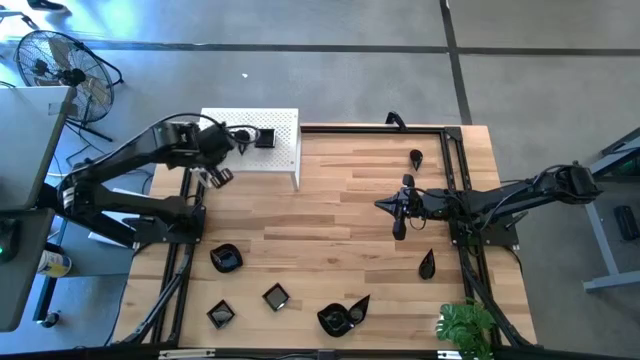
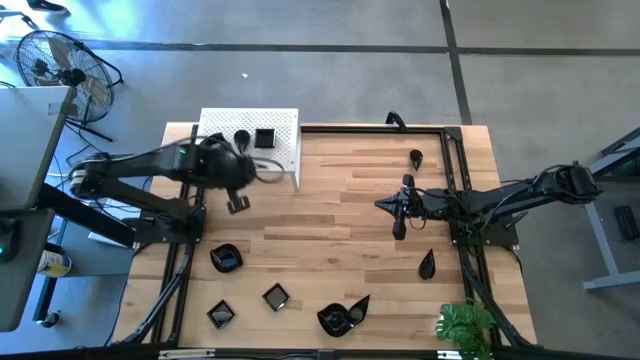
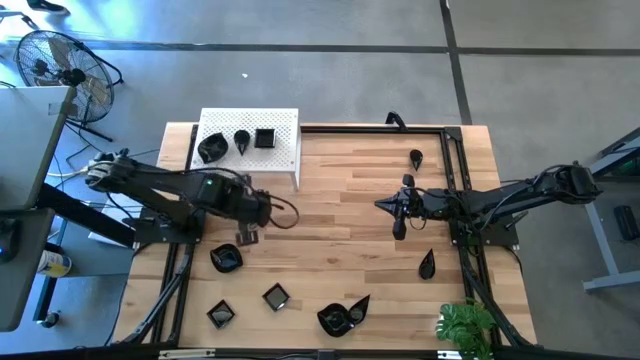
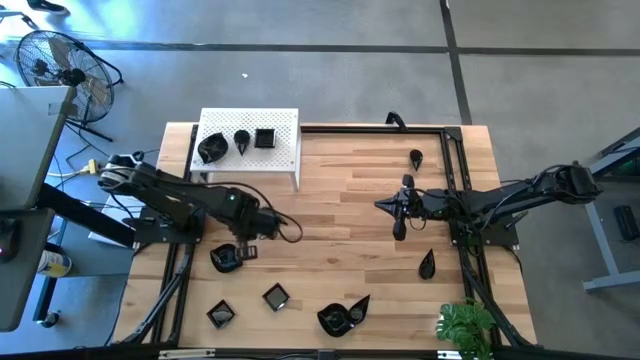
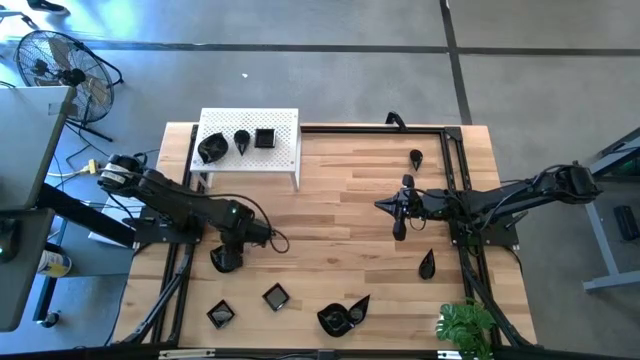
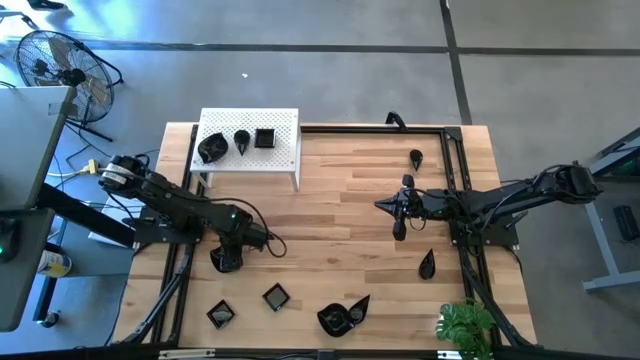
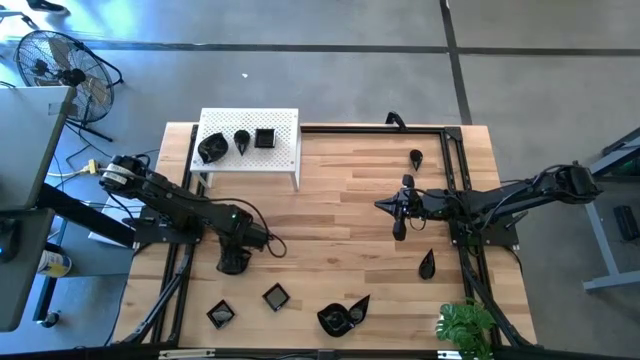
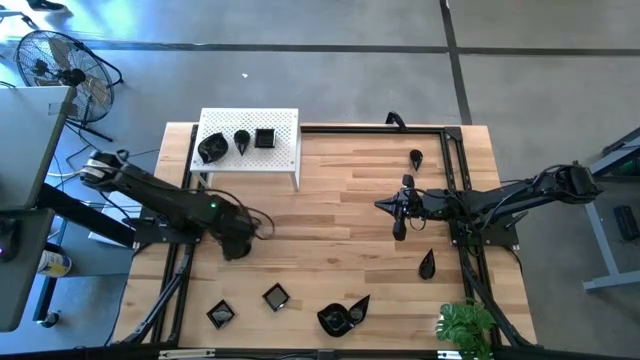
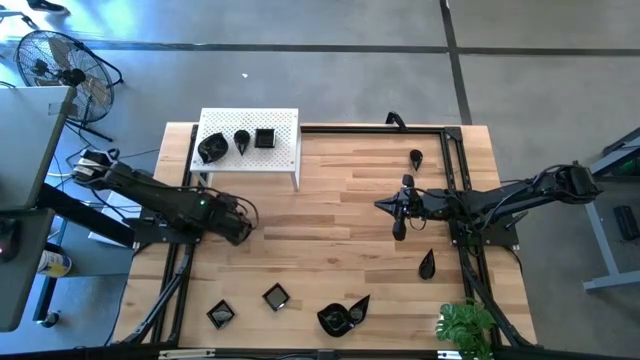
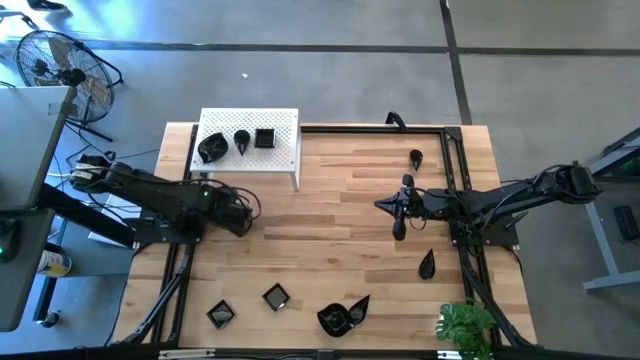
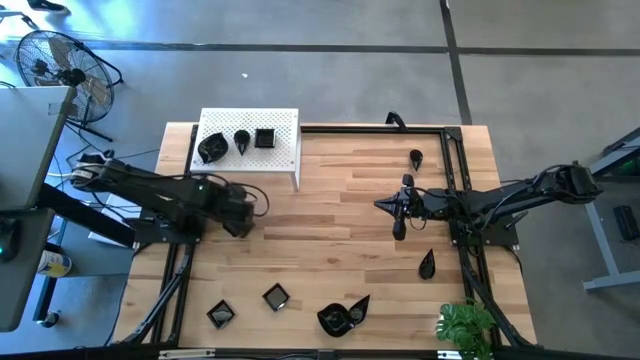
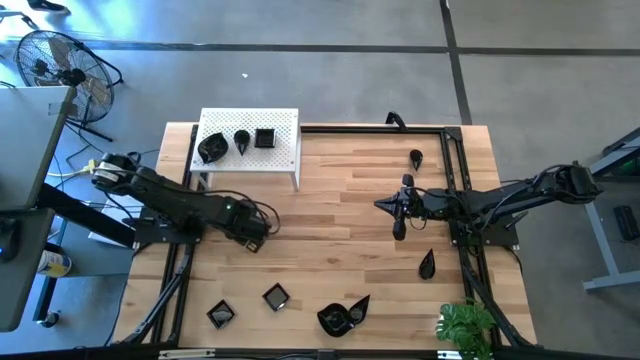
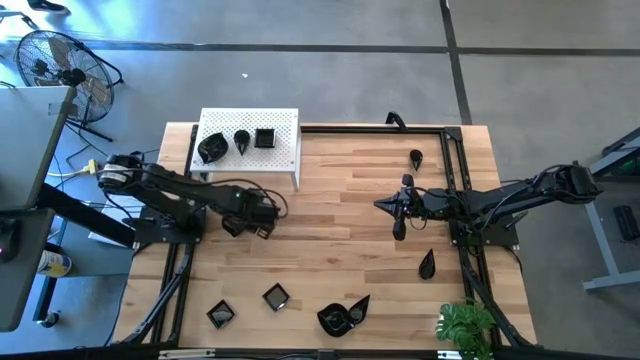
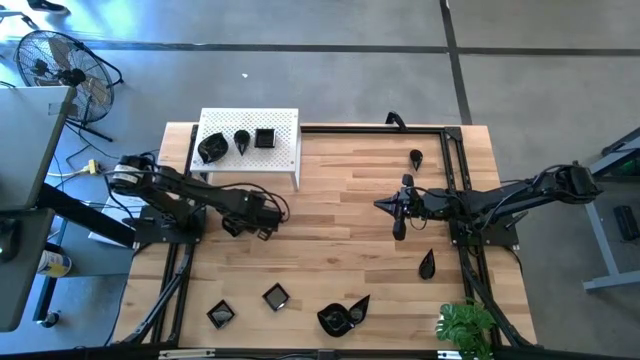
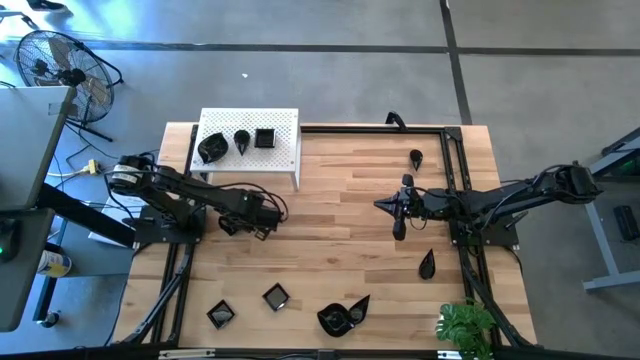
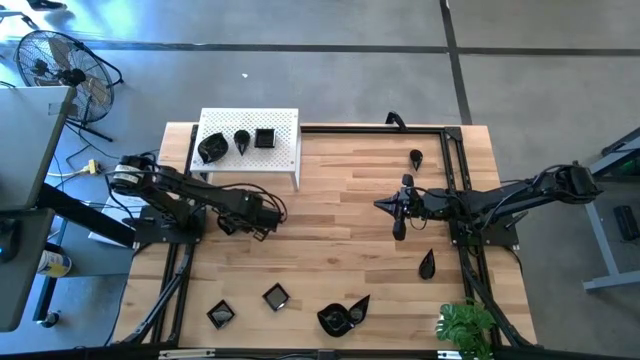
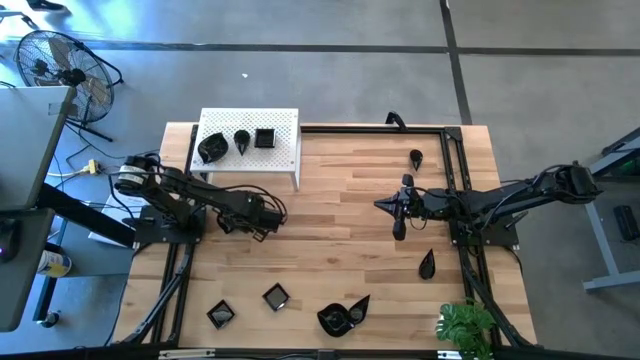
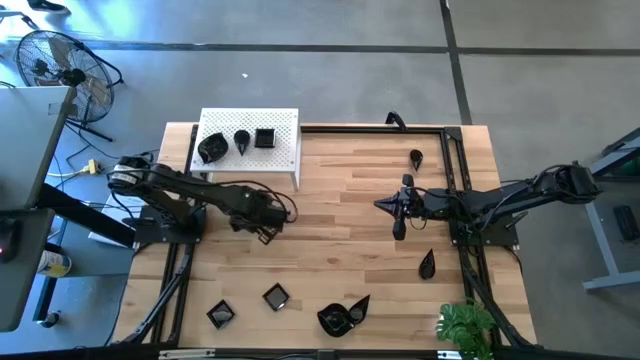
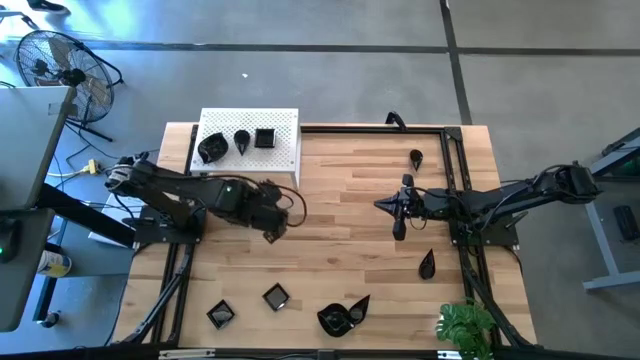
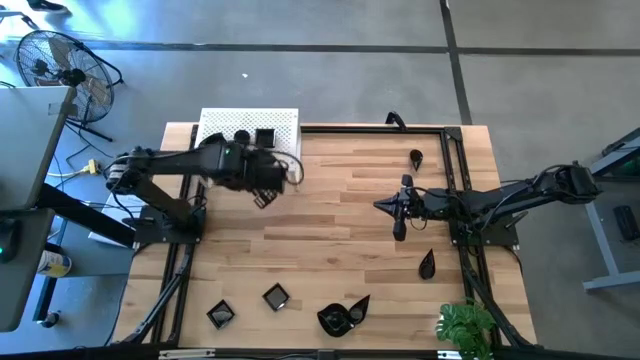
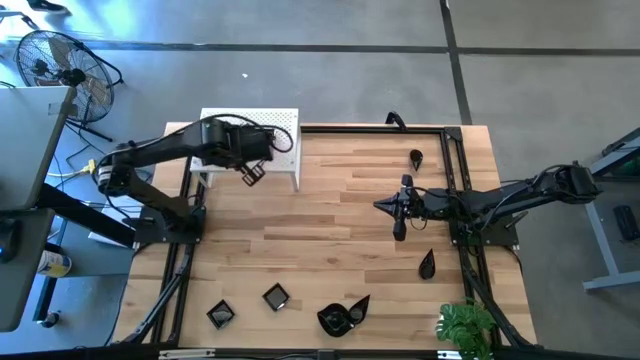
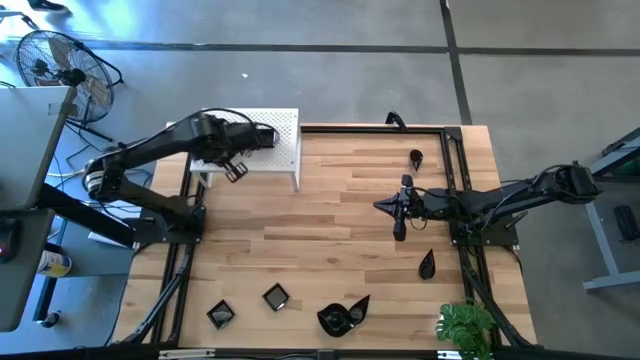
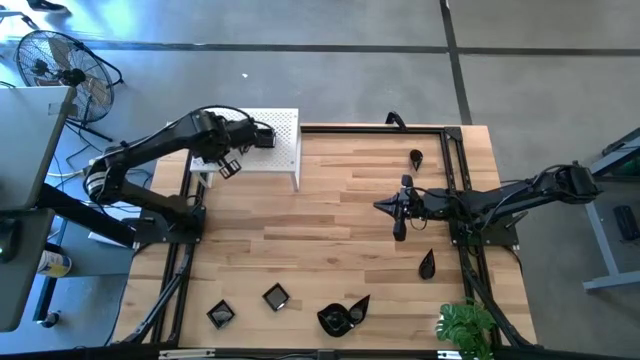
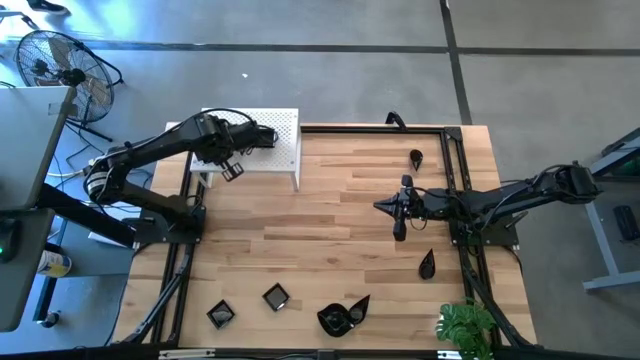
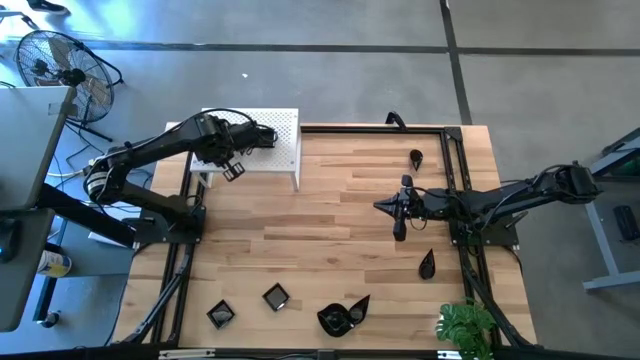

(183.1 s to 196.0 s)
Task: Pick & Place Mini shaped plates
Stack the top black leaf shaped plate on top of the stacked black leaf shaped plates on the shelf

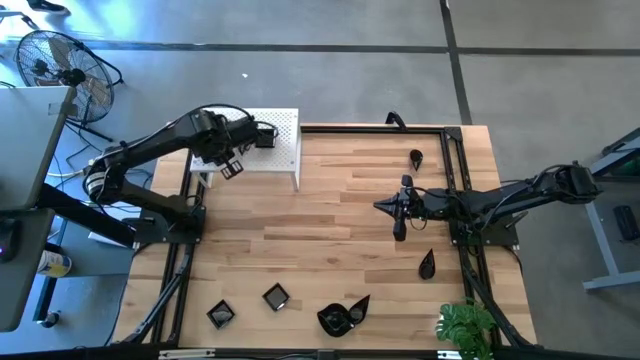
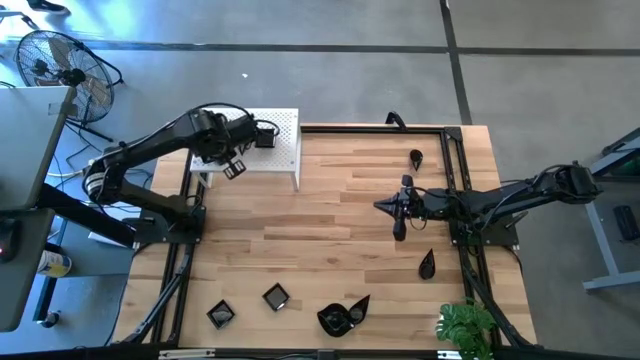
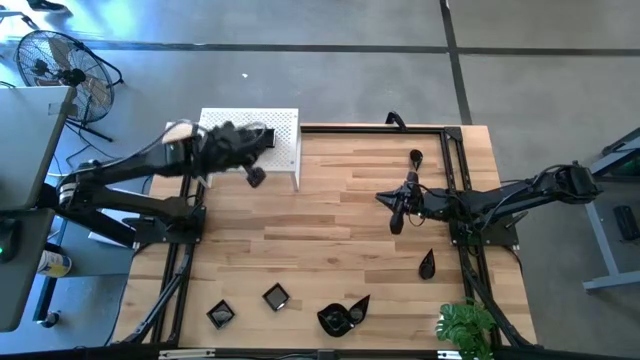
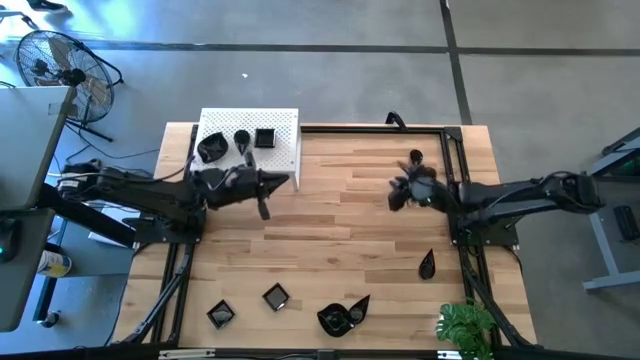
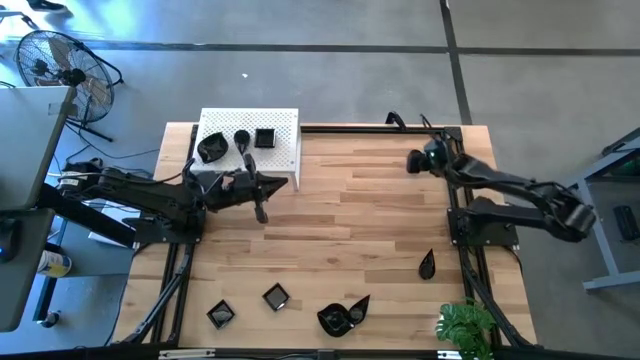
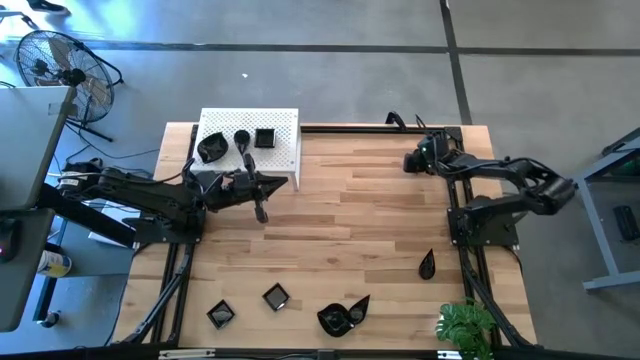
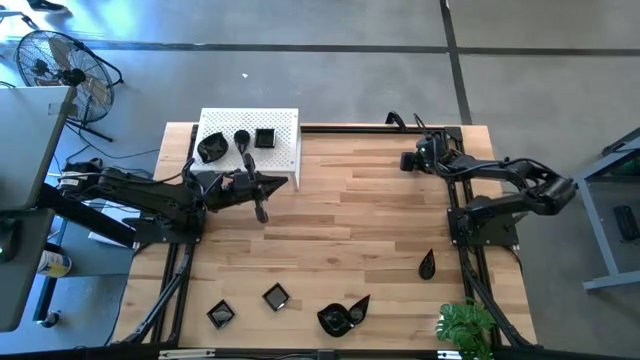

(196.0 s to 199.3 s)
Stack the top black drop shaped plate on top of the stacked black drop shaped plates on the shelf

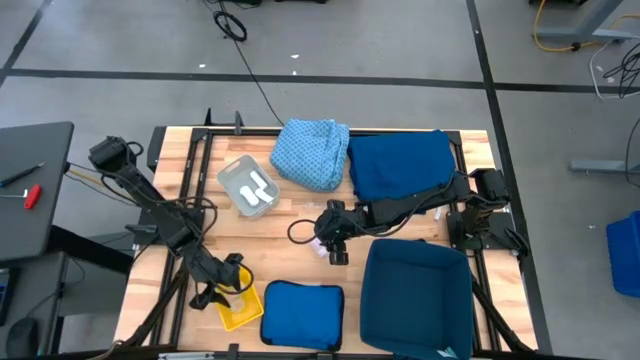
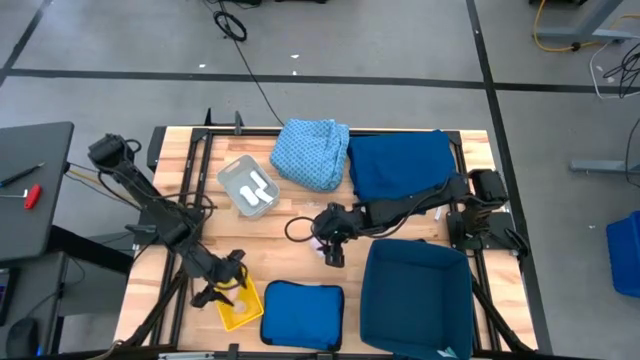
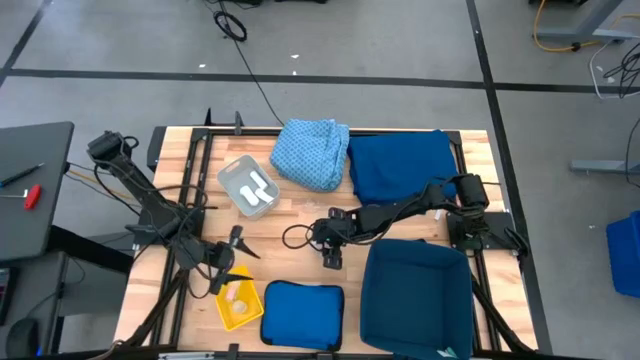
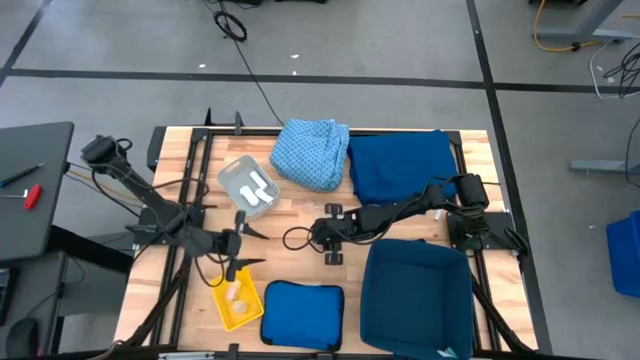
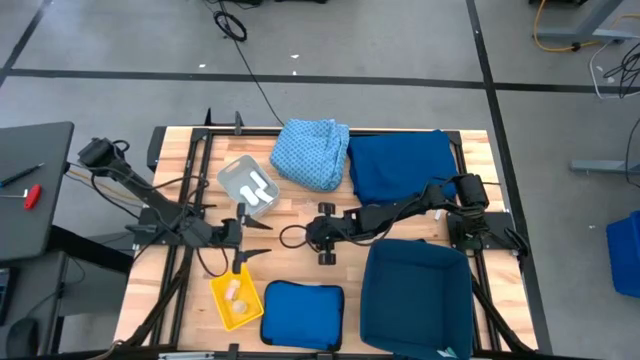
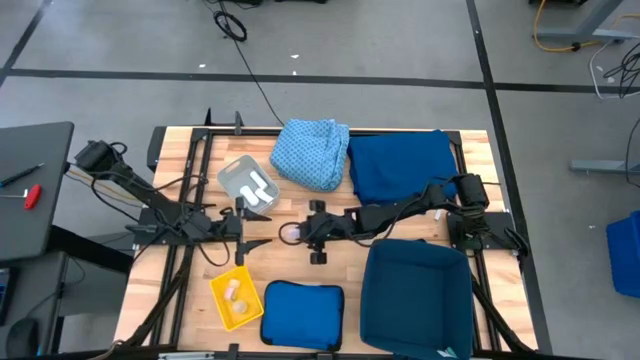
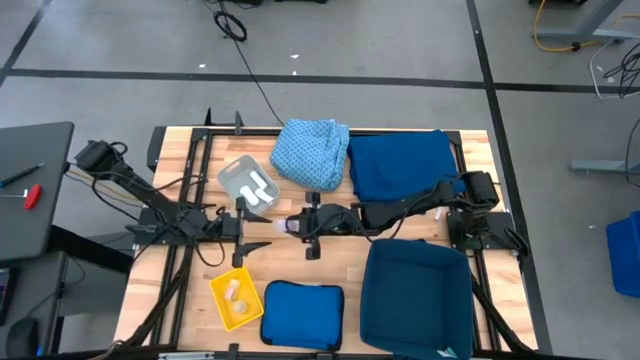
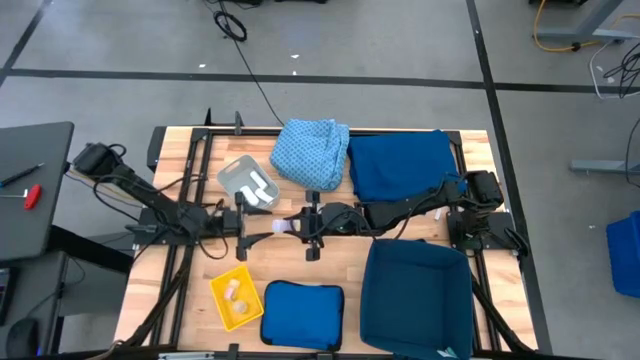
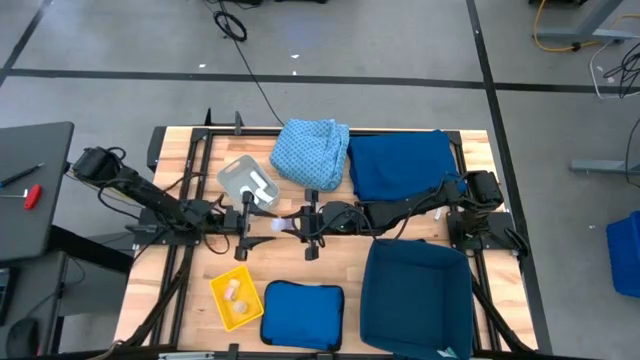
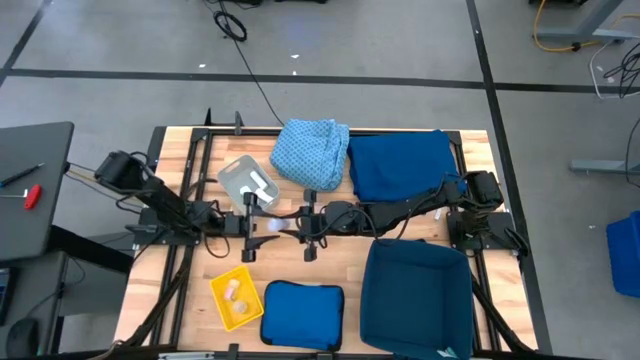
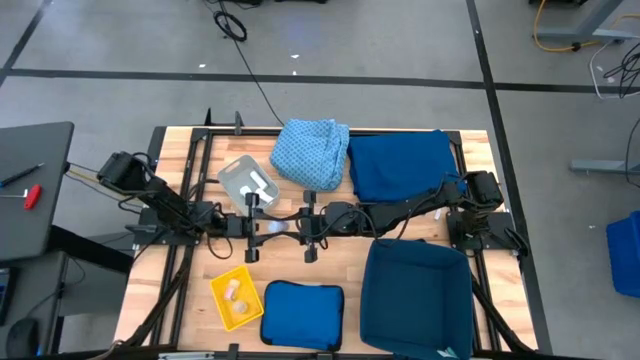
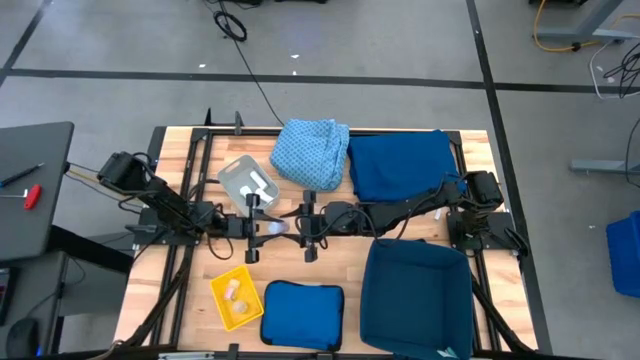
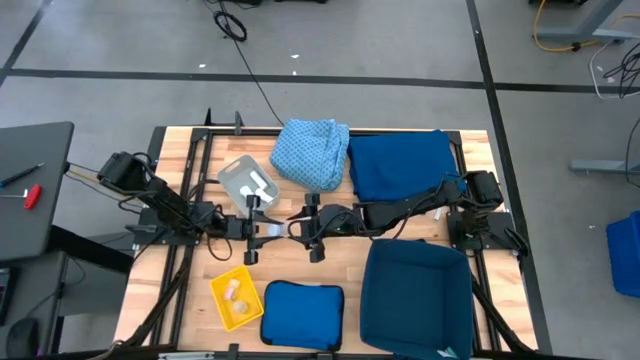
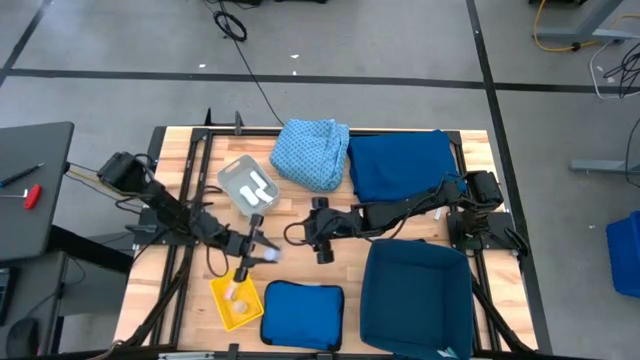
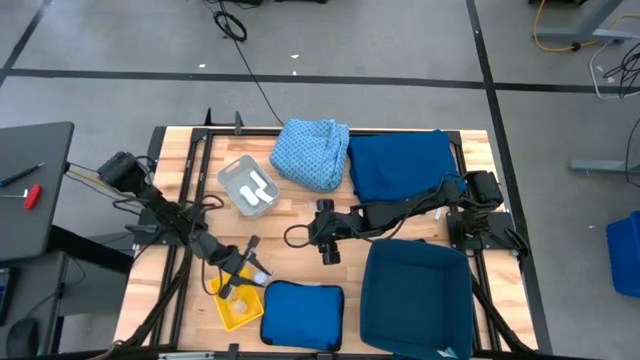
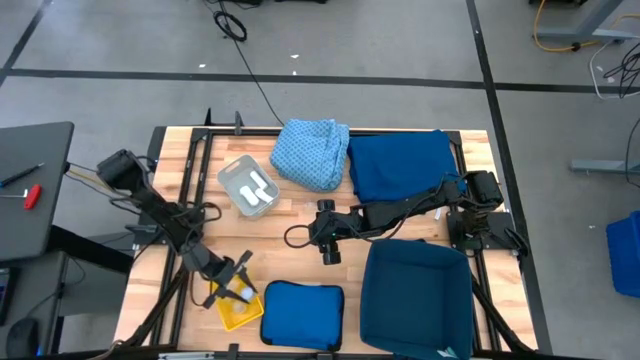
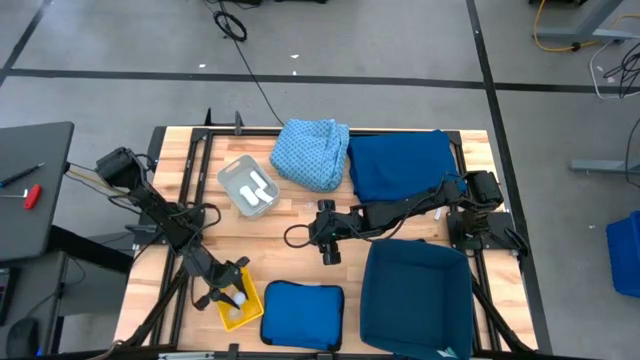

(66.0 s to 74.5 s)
Task: Pick & place medical supplies in basket/bin
Put the white medicine bottle into the yellow bin
